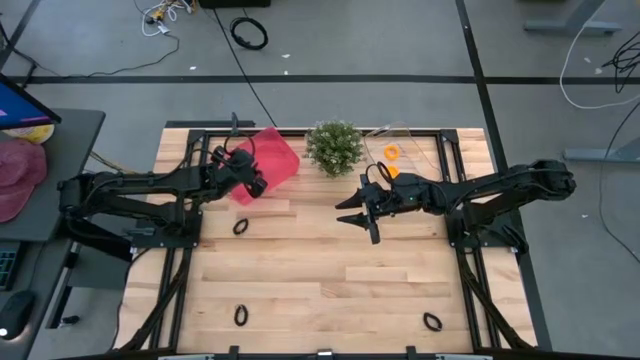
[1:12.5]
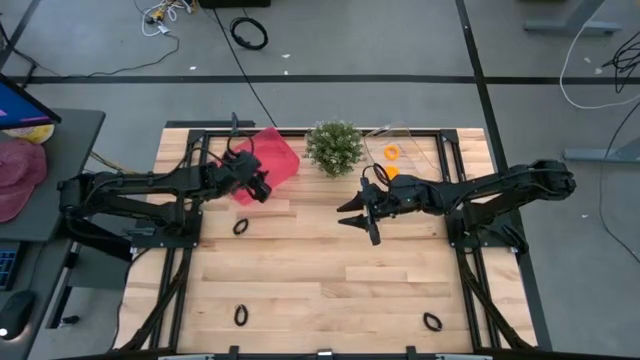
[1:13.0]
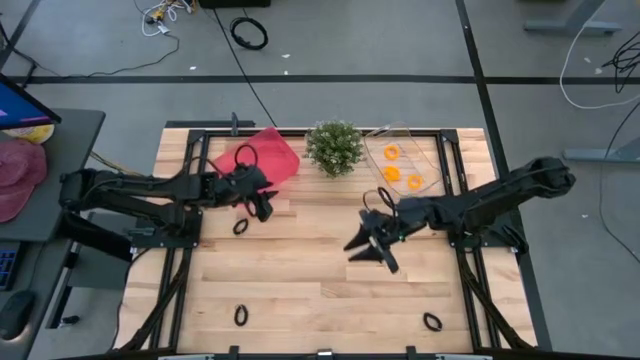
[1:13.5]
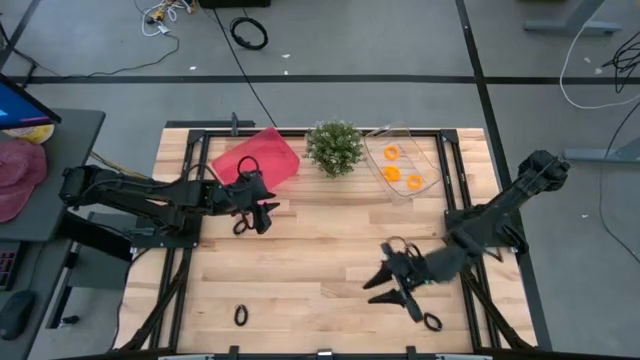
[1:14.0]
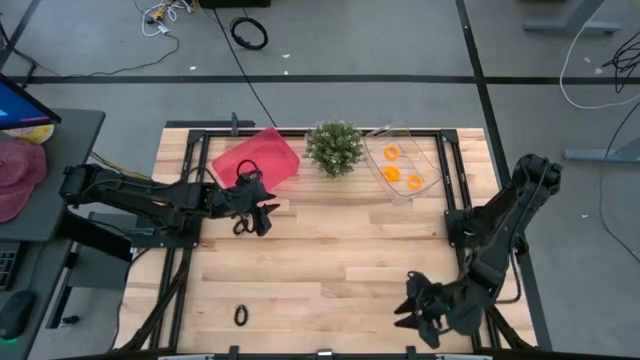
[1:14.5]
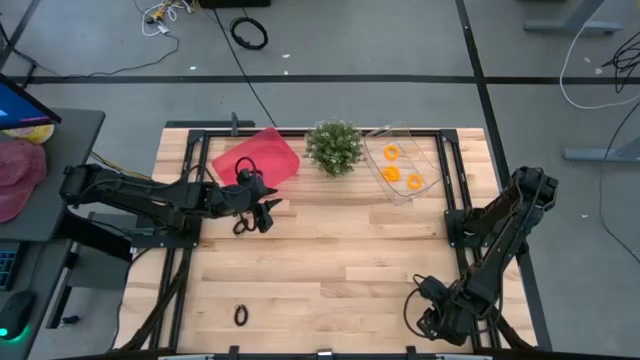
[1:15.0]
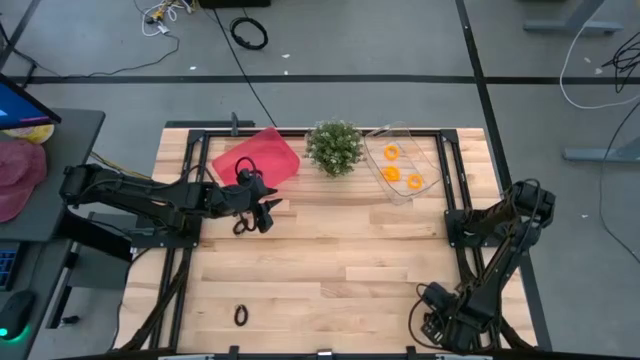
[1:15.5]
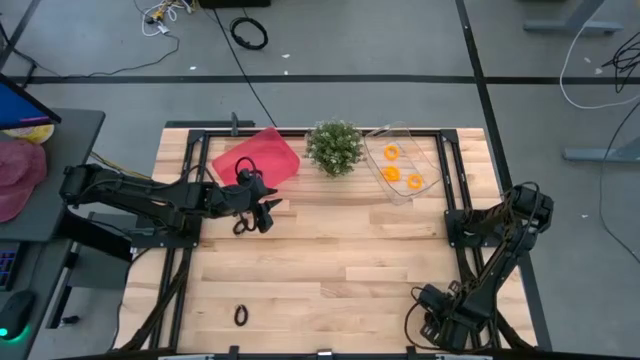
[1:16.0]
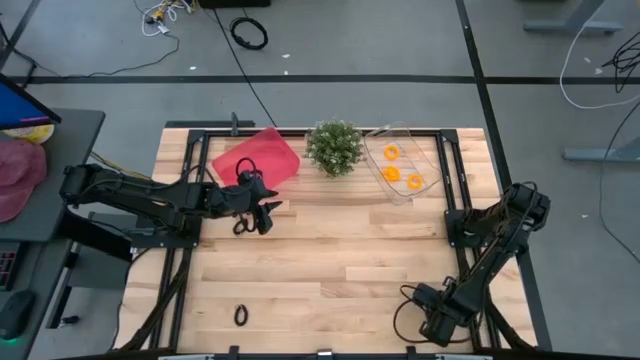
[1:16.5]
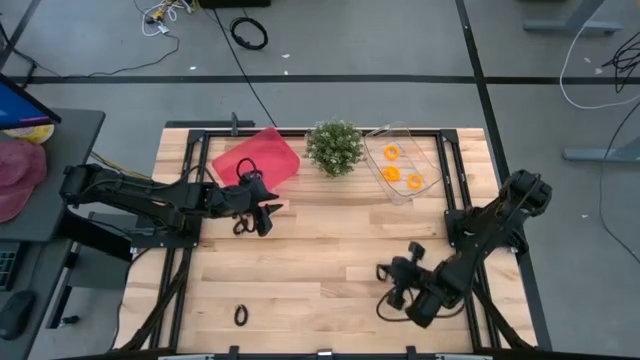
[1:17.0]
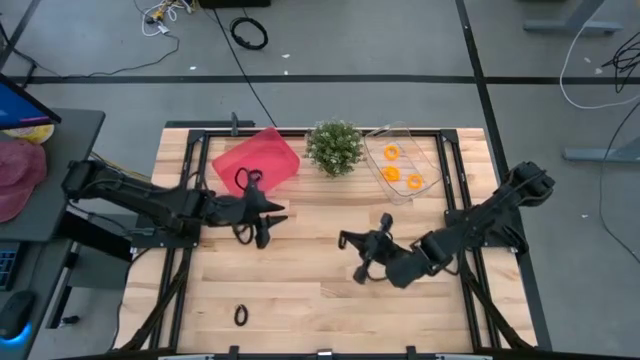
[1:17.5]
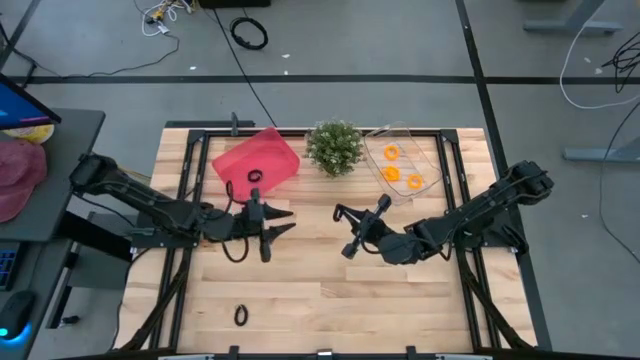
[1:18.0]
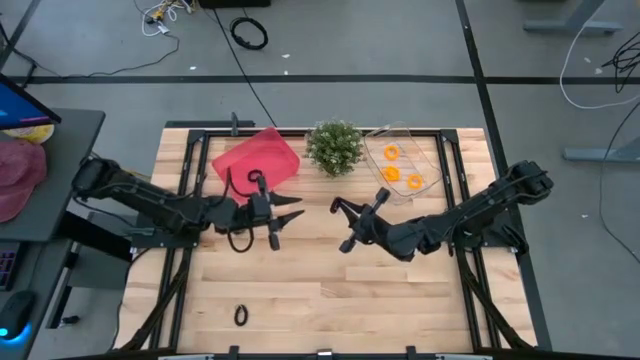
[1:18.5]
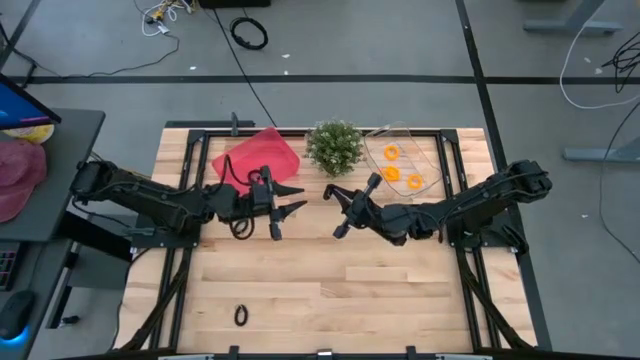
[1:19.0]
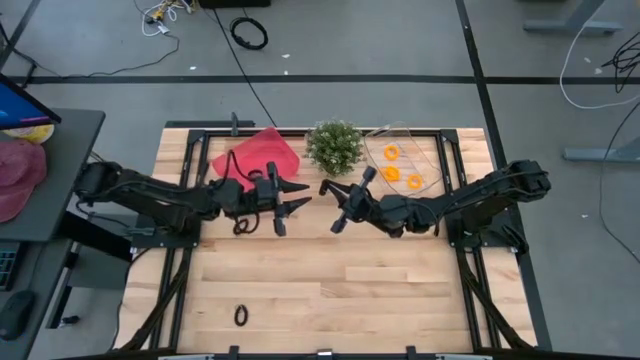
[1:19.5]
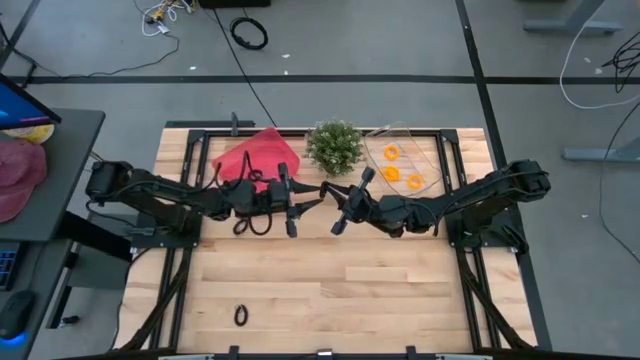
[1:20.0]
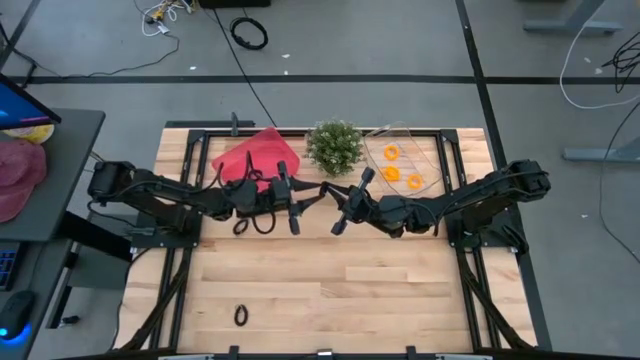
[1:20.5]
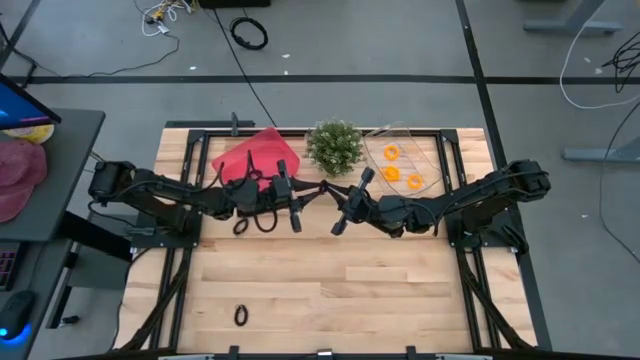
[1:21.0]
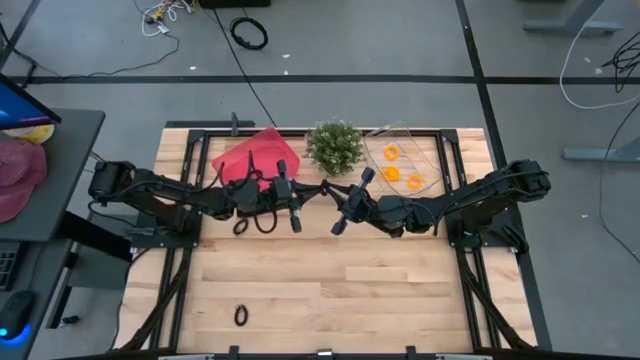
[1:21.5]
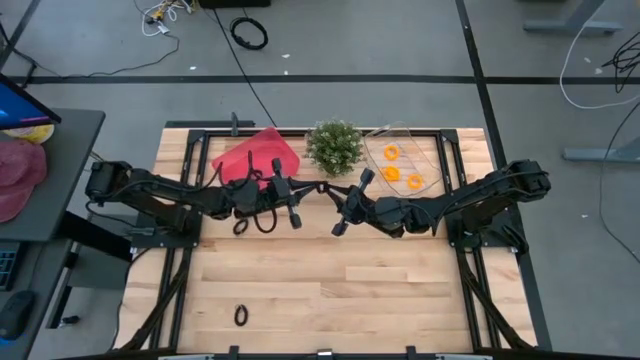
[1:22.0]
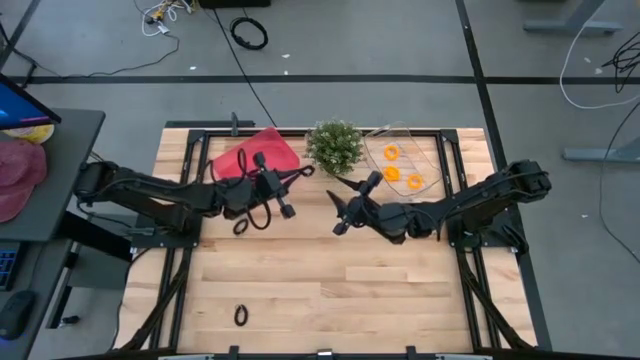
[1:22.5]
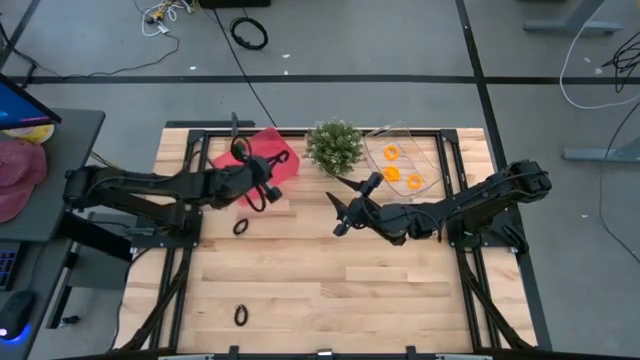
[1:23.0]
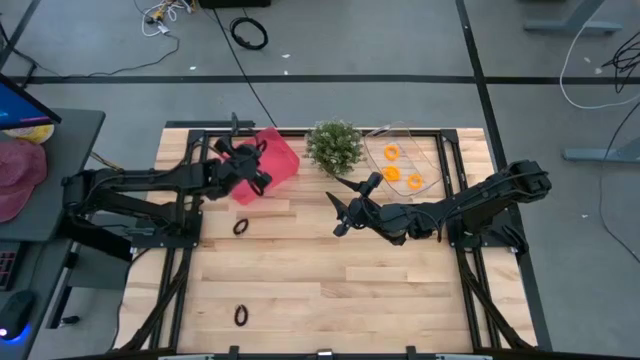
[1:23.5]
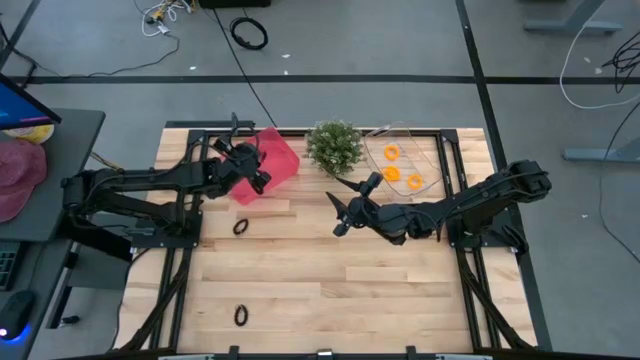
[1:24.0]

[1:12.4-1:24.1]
Task: Sort spring keychains
Put the black spring keychain into the pink bin

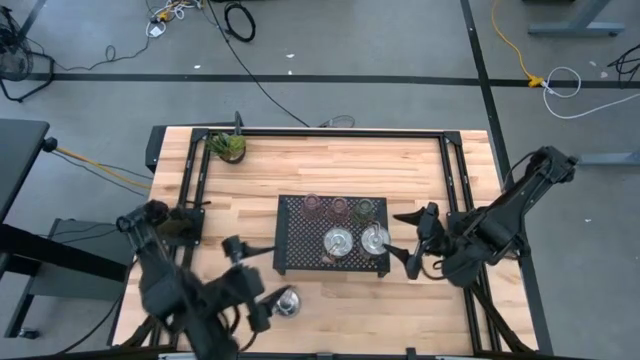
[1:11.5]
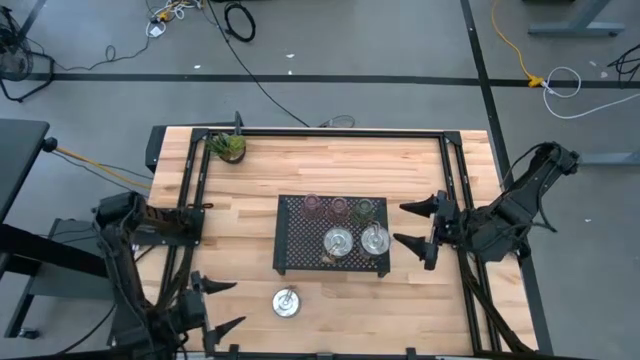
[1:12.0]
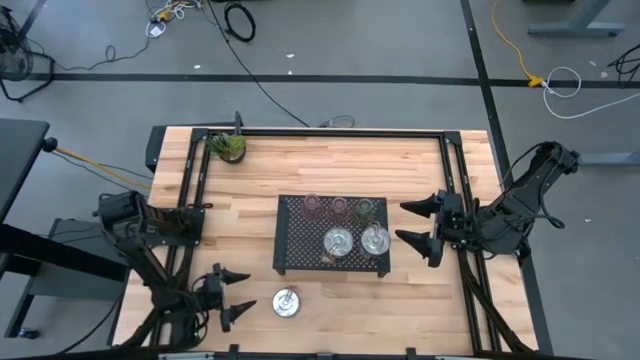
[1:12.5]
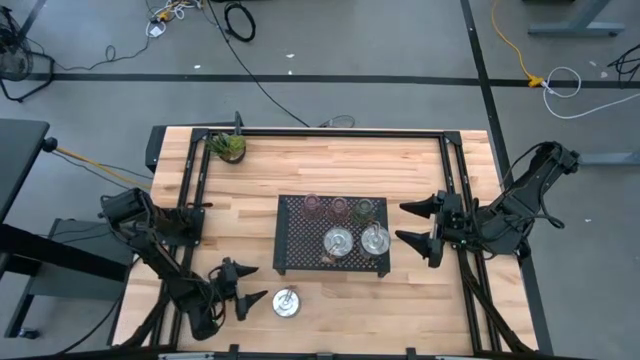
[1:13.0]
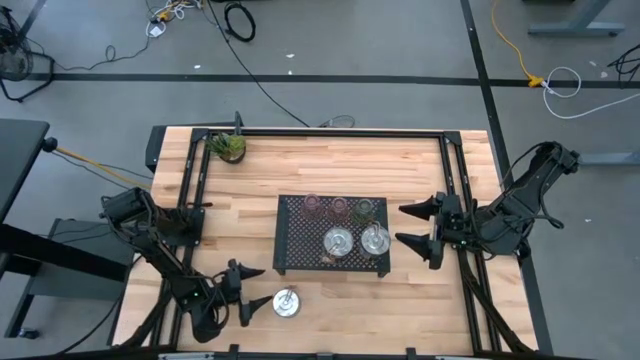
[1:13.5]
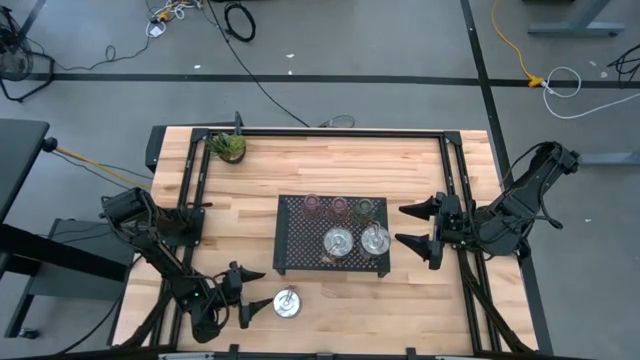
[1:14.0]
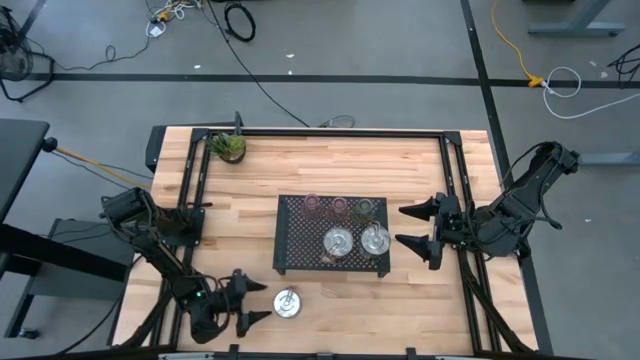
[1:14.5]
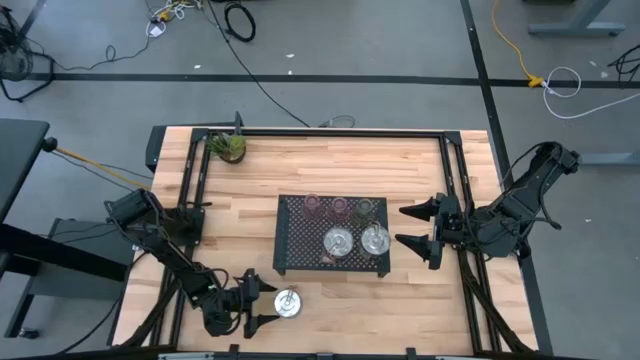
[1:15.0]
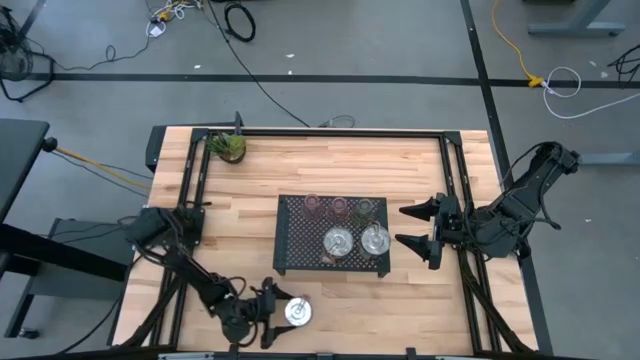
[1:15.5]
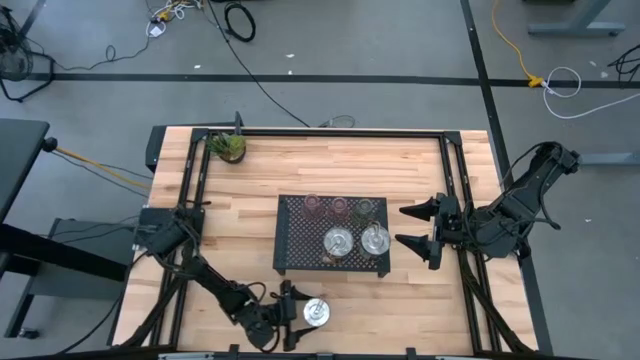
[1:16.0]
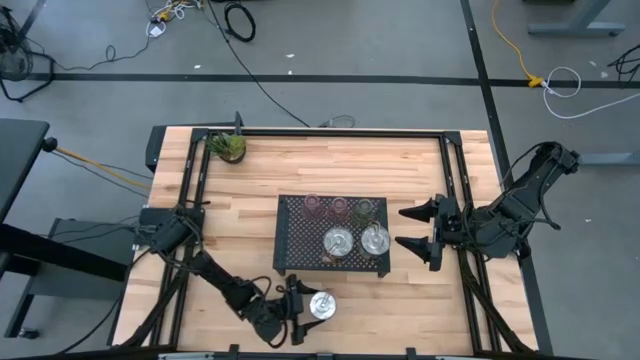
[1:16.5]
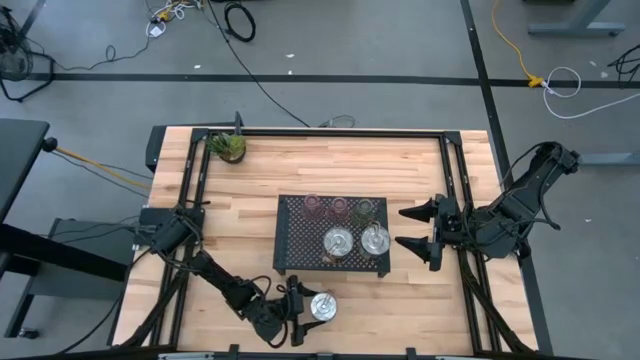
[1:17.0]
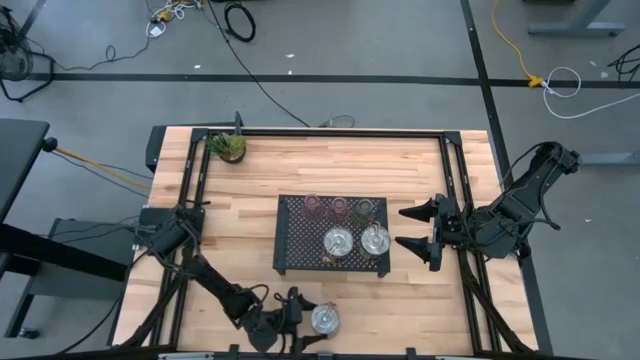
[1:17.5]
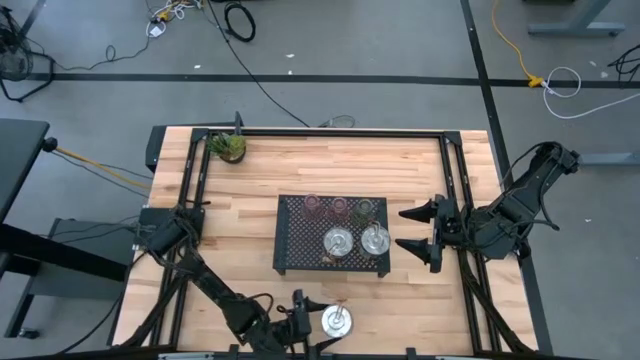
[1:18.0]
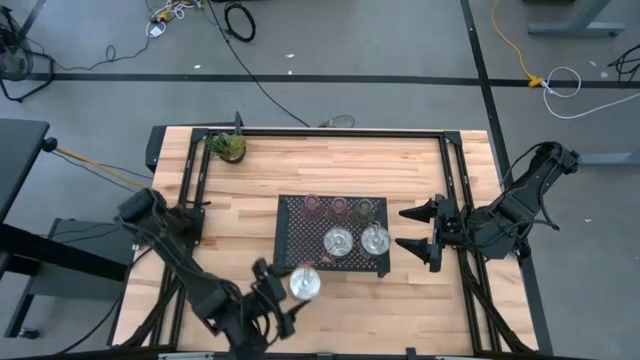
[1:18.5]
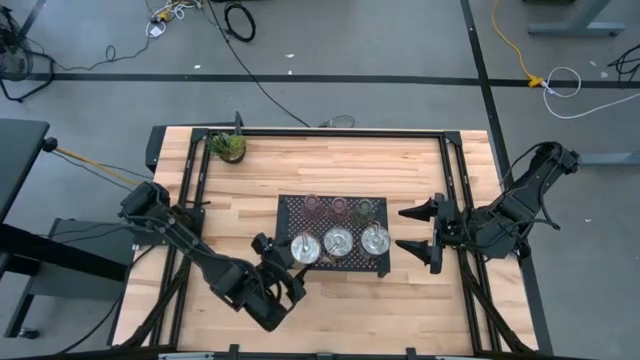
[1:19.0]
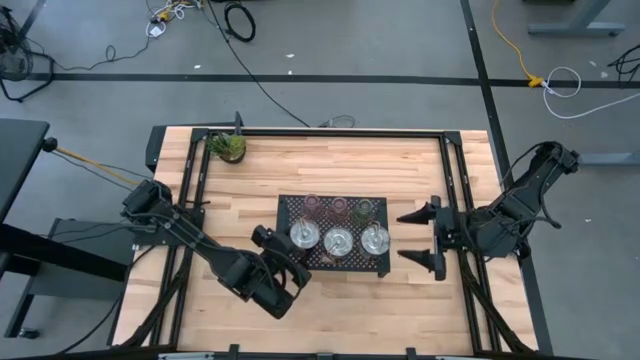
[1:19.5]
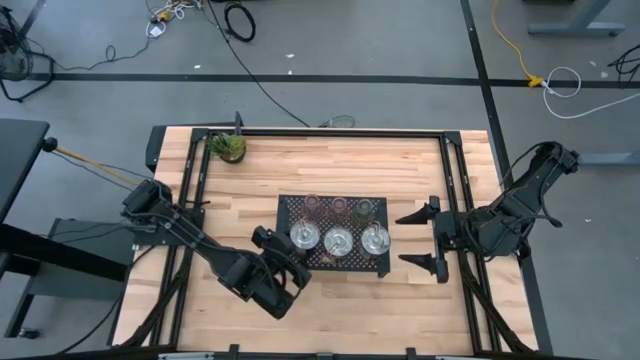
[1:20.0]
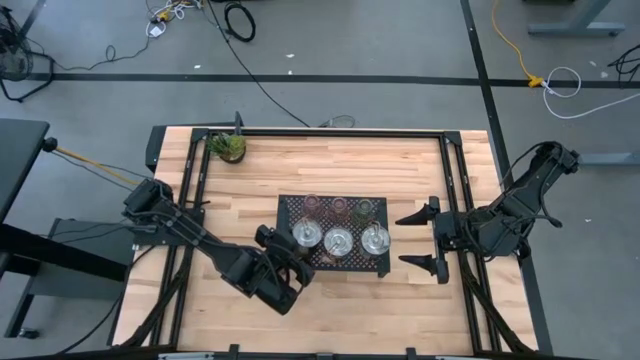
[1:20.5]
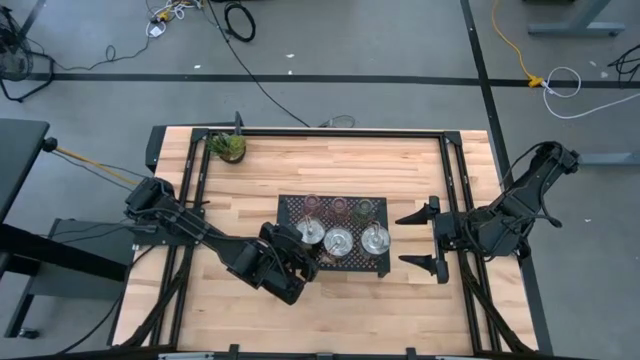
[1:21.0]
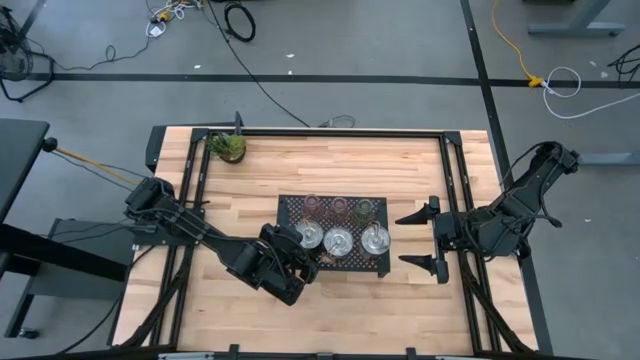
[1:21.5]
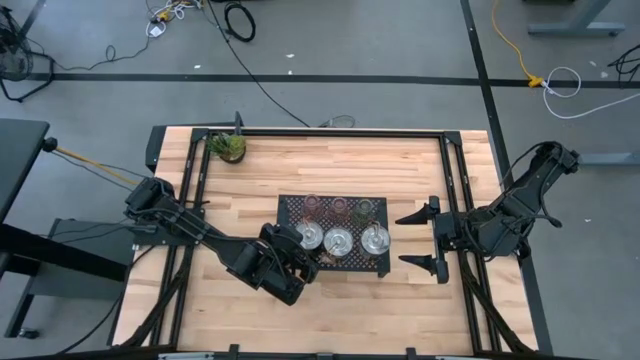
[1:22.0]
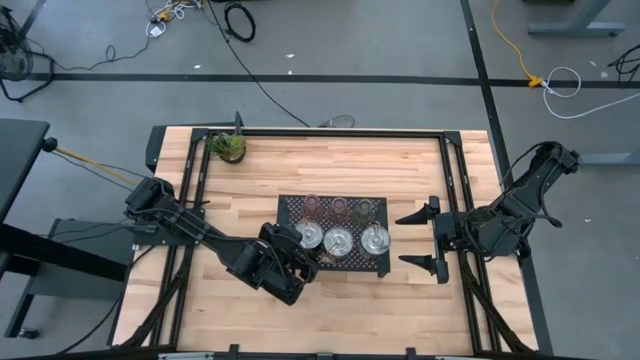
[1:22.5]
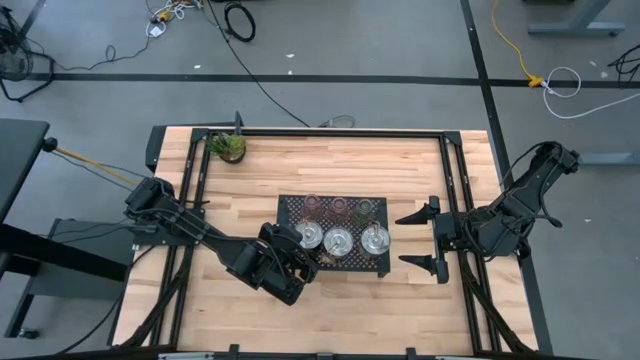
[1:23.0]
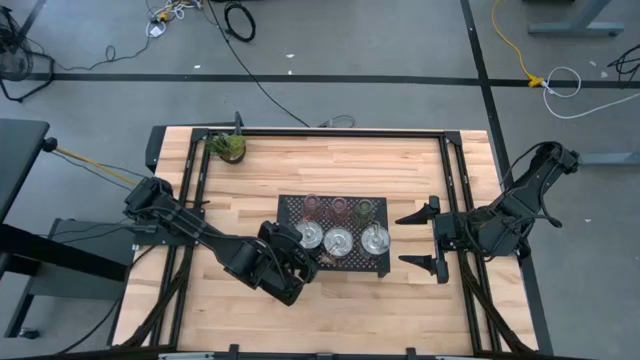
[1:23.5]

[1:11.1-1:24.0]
Task: Pick & Place candle stick holders
Put the silver scented candle on the shelf
